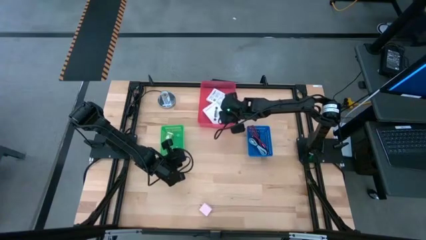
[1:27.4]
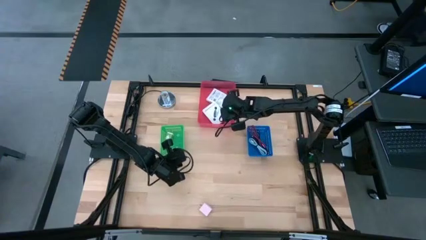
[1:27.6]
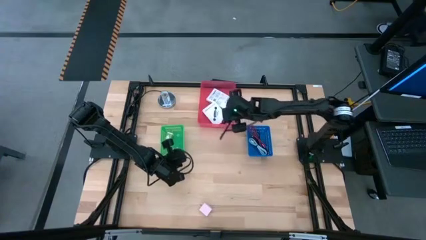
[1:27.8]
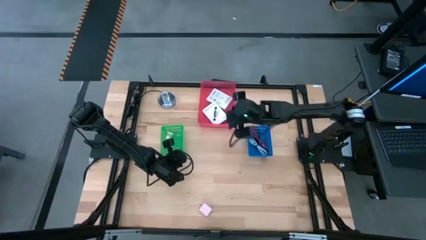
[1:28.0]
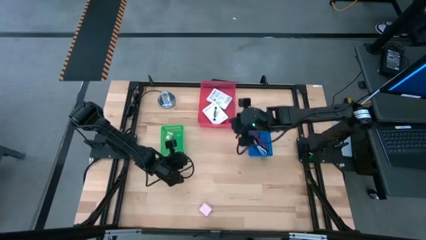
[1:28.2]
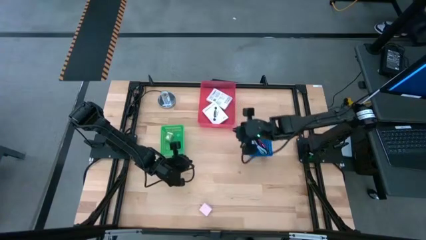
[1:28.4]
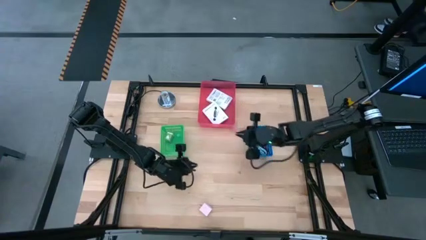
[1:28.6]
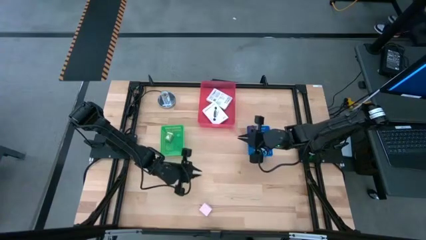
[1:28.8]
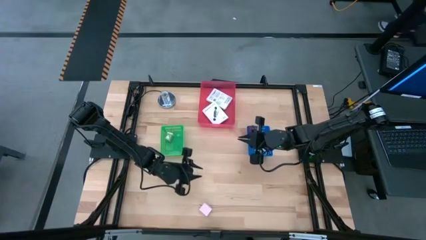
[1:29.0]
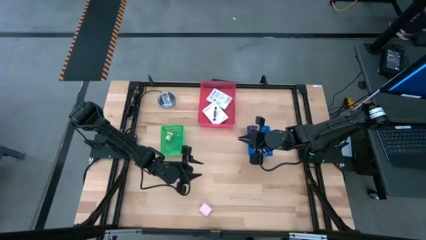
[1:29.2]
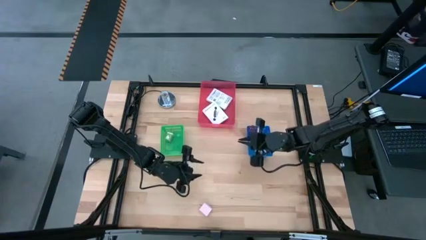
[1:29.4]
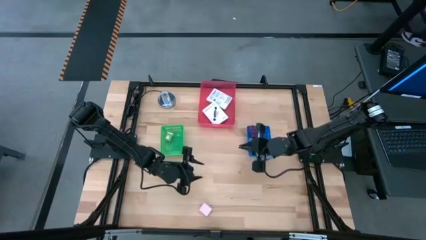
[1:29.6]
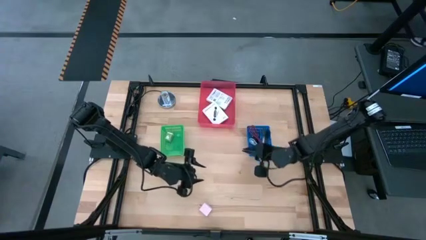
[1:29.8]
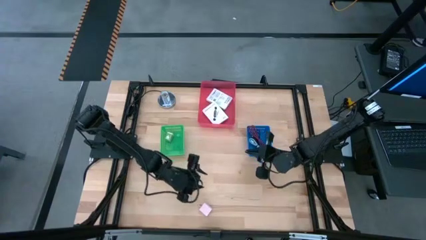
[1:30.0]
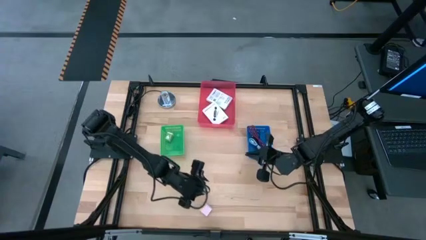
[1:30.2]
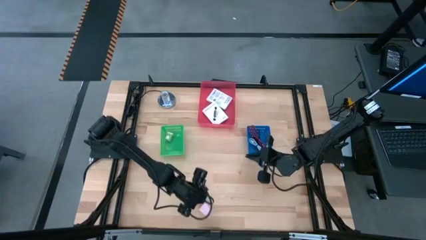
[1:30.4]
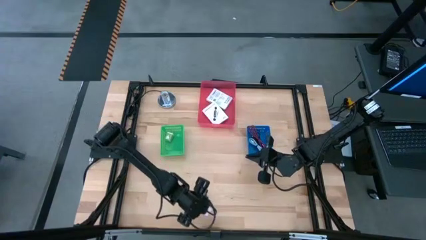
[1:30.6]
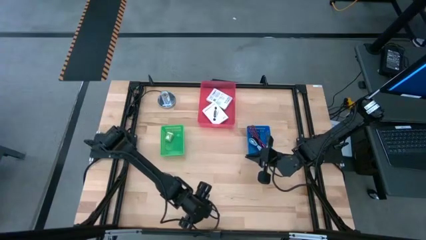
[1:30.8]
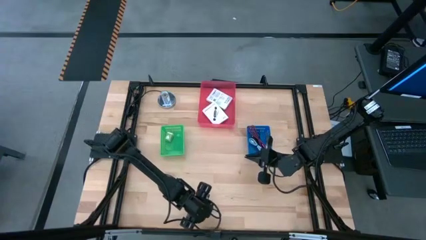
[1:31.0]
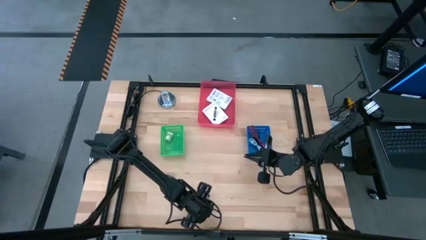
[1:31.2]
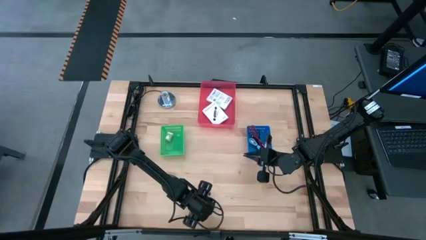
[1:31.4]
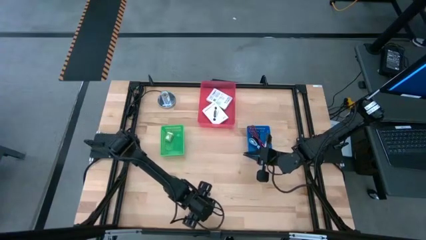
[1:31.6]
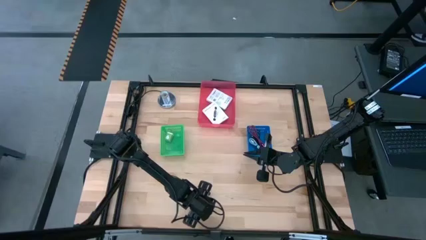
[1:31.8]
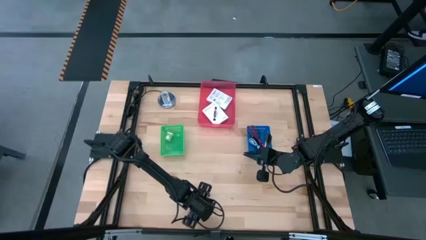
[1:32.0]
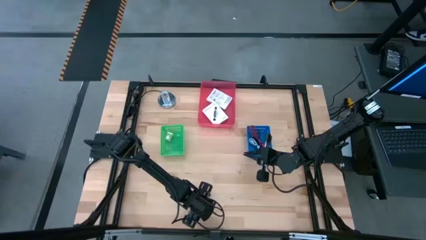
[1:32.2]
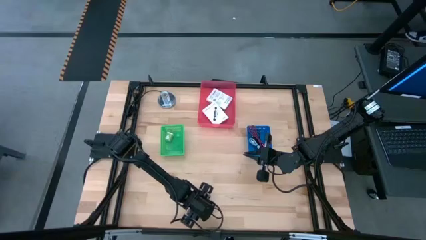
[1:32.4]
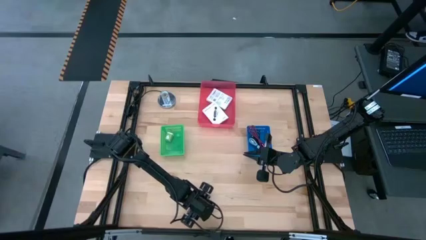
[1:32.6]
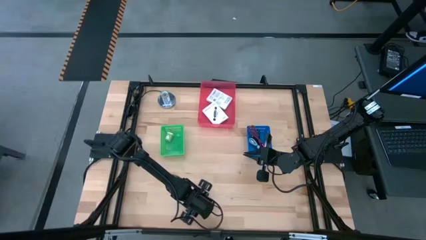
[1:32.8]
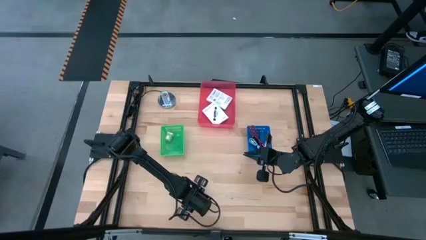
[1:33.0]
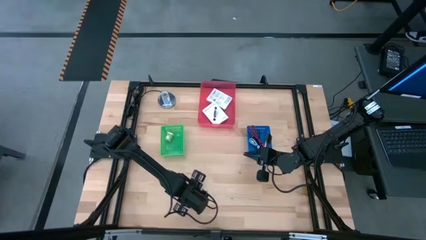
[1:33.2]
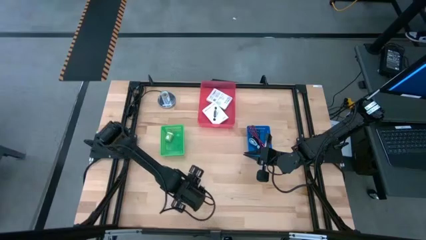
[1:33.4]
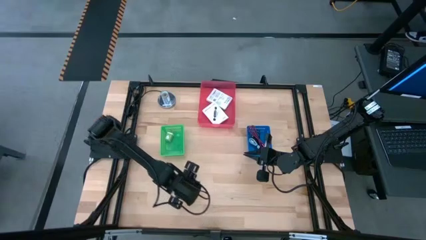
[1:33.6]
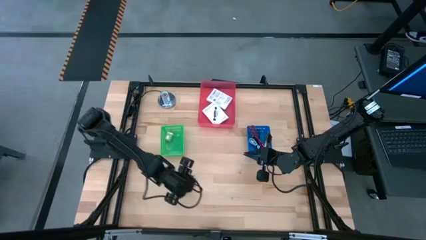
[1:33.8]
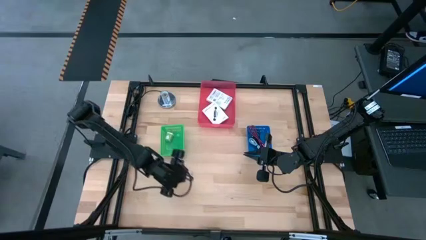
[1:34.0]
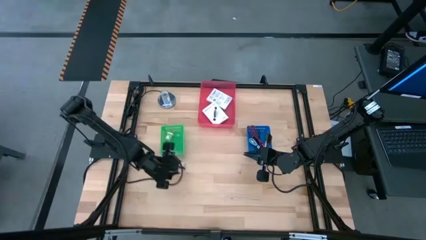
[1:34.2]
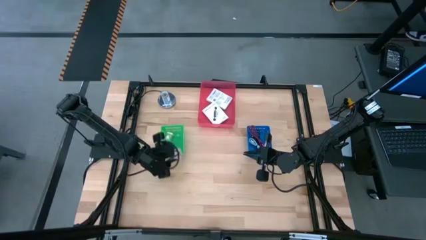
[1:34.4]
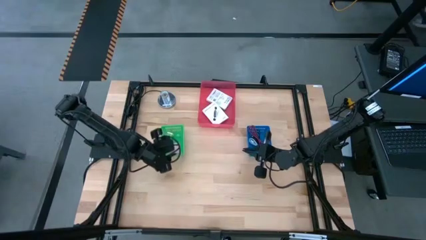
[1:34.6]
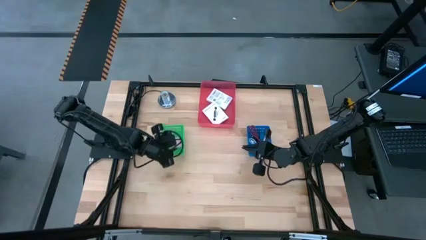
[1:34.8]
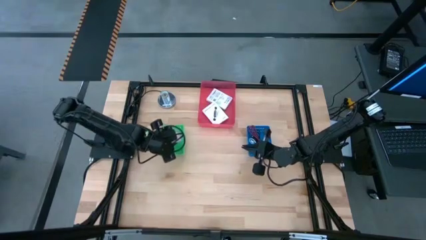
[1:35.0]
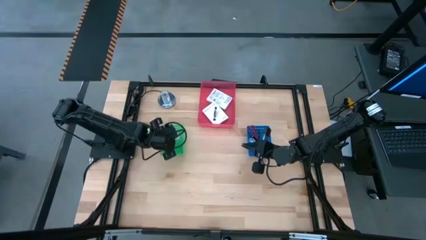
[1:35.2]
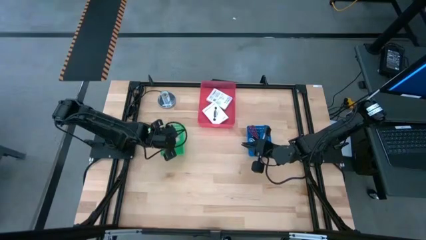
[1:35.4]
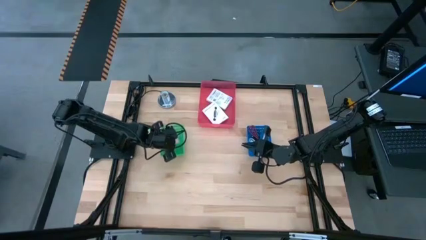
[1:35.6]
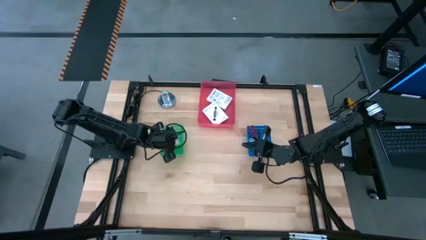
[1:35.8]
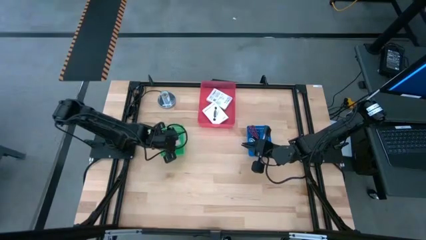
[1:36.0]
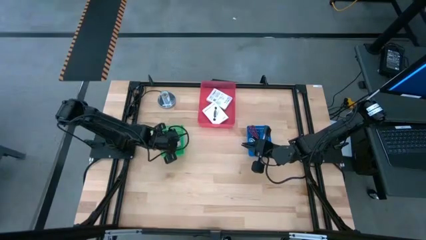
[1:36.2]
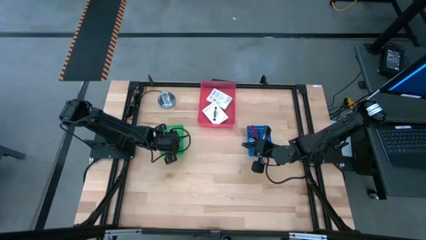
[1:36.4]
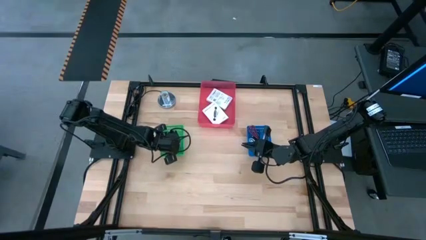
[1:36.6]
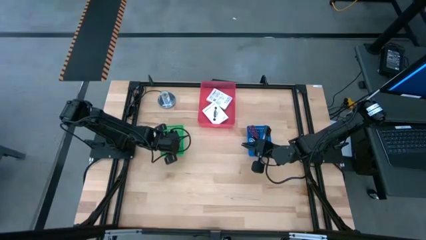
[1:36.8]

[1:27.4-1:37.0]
Task: Pick and place items into bin
Put the white charger adapter into the green basket

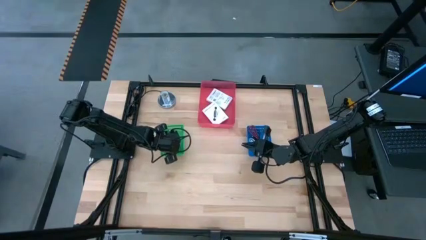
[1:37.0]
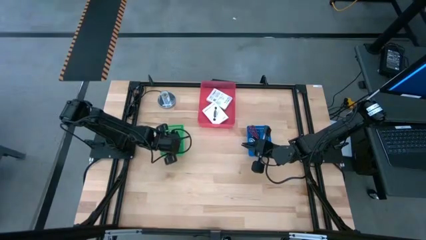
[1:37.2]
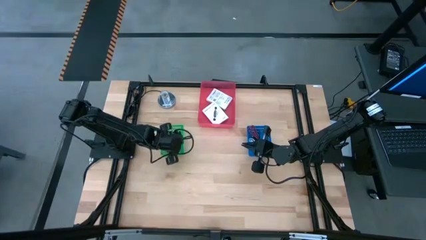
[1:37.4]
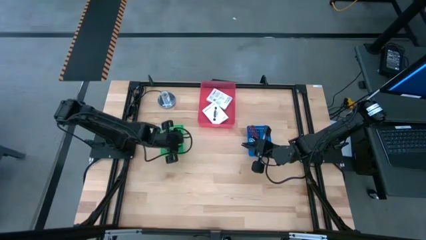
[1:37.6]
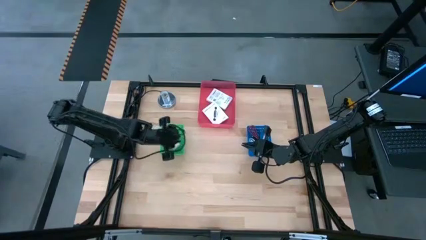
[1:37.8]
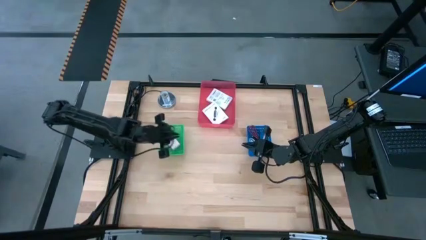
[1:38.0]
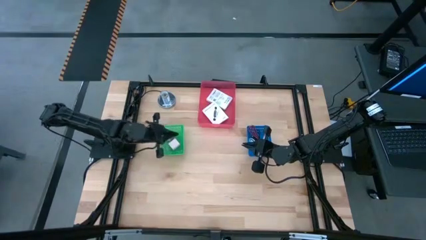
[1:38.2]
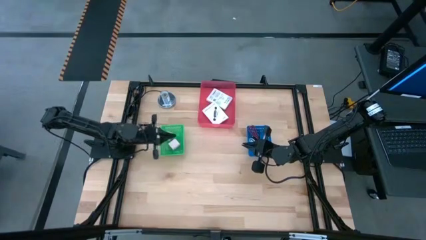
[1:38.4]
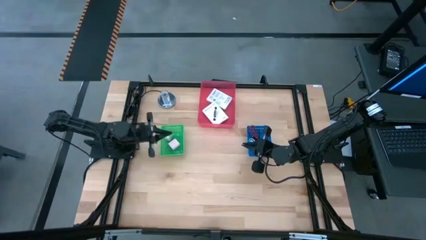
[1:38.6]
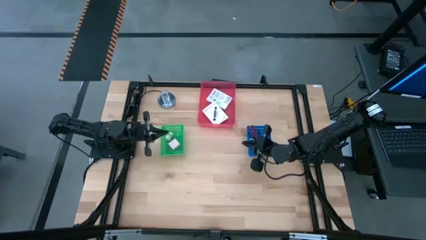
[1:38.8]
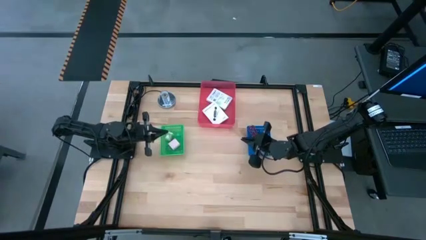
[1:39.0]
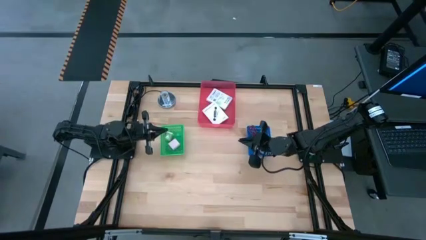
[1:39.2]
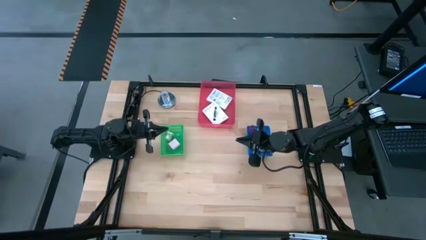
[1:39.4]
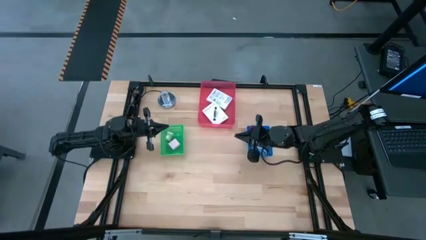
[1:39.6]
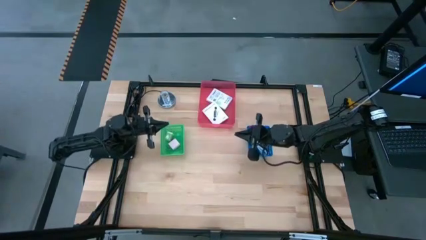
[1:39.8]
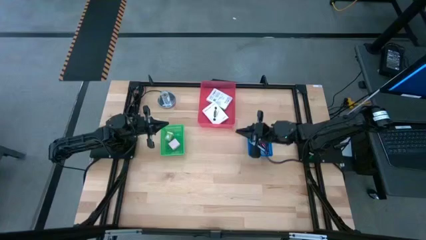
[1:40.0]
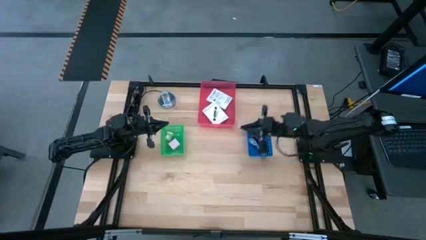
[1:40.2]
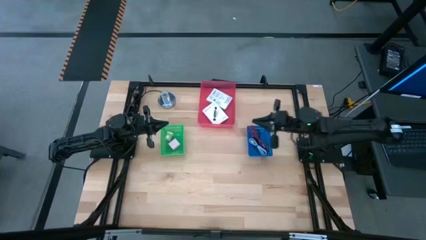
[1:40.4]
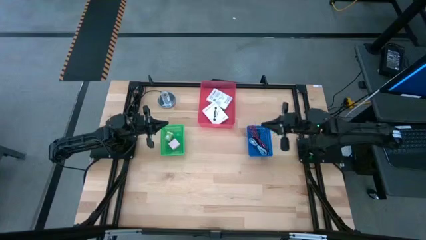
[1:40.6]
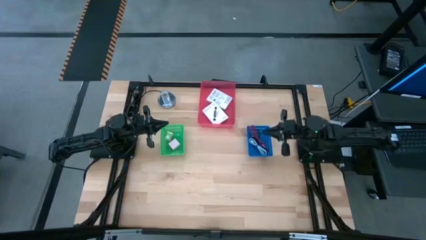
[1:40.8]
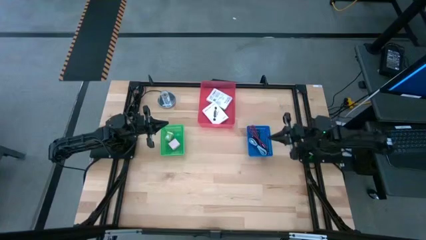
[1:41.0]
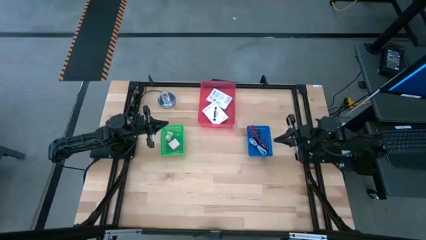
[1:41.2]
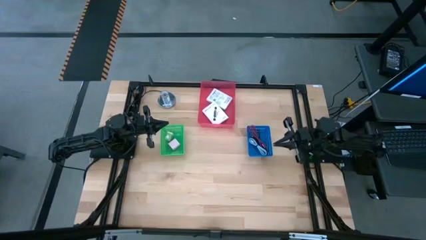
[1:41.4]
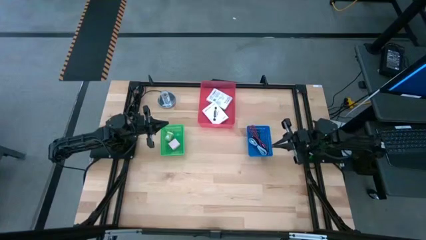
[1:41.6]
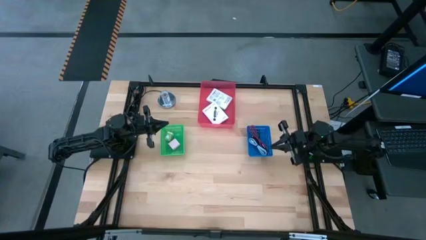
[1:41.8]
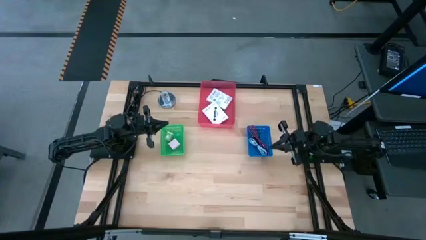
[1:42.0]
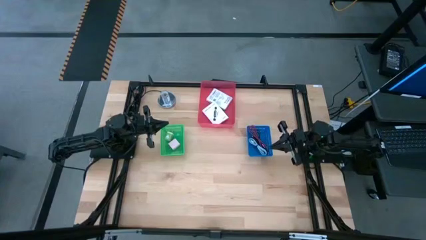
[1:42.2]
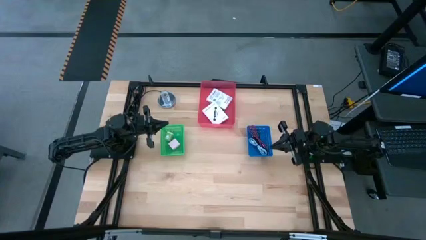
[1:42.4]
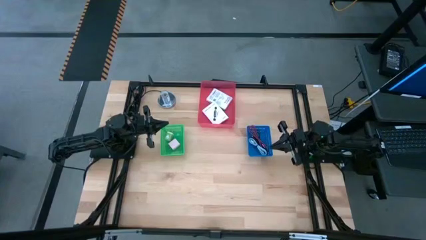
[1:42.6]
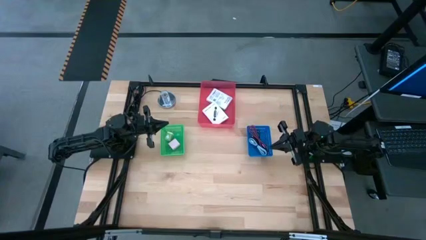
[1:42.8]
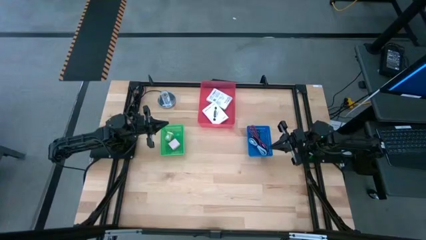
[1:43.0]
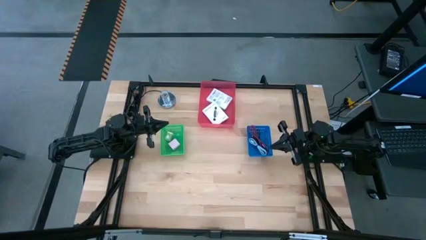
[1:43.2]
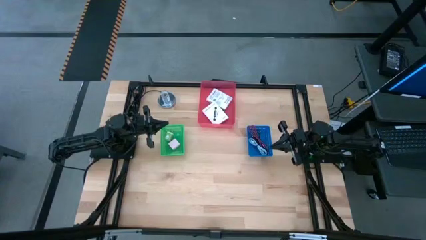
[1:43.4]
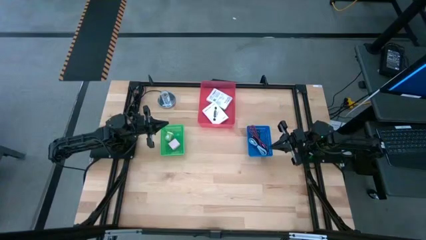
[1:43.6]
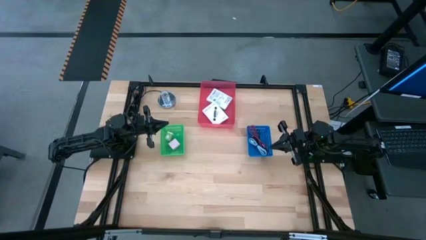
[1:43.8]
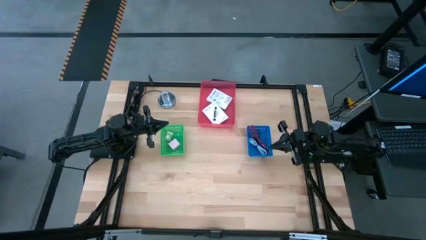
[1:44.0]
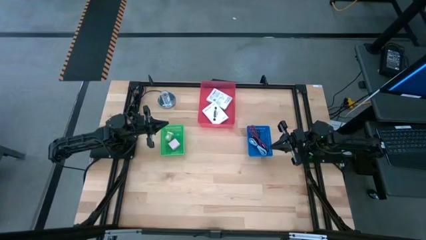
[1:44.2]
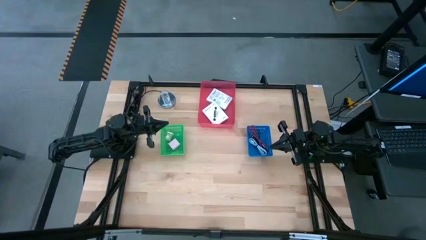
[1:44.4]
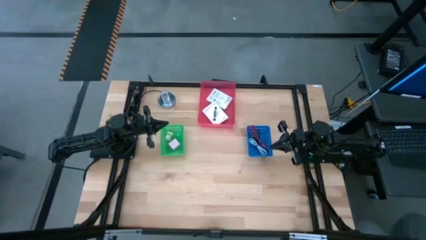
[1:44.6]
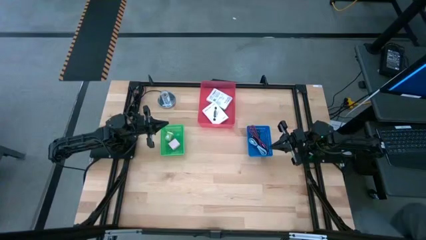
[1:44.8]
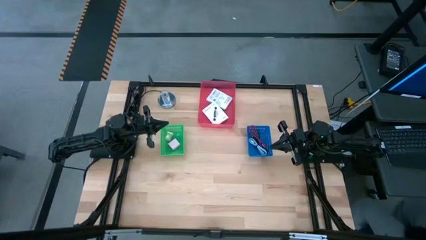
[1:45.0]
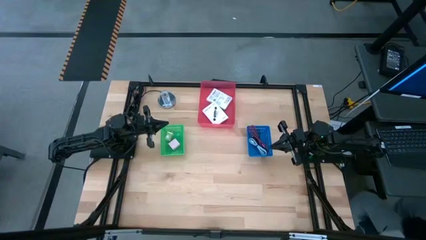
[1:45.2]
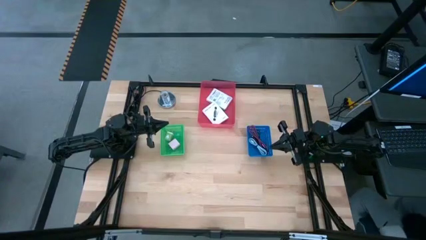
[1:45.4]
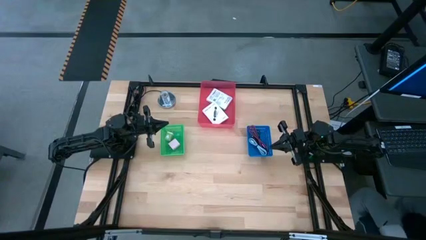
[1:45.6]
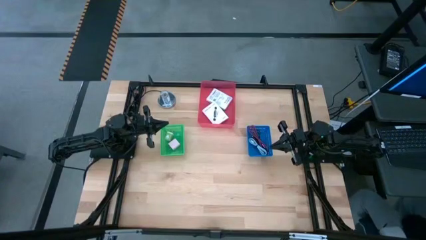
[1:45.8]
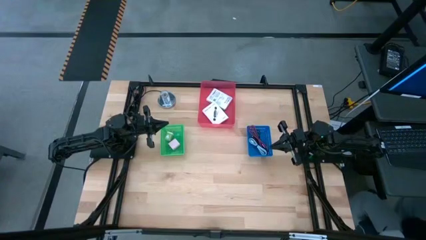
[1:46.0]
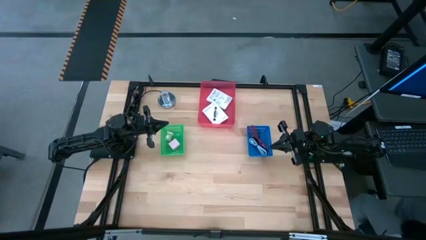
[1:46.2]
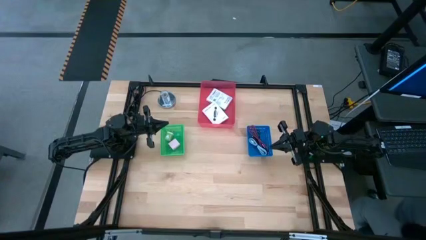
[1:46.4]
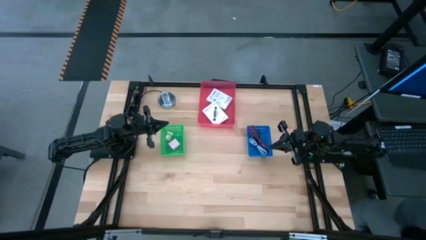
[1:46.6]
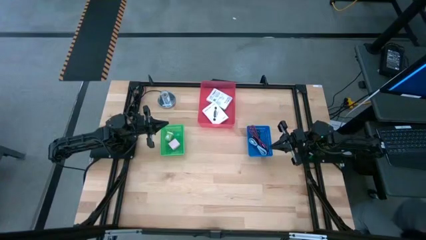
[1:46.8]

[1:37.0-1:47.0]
Return to Home Position
